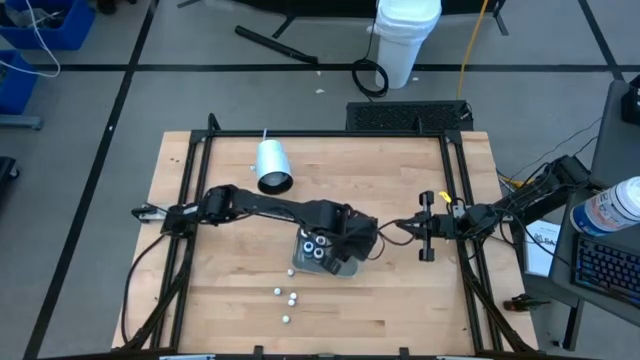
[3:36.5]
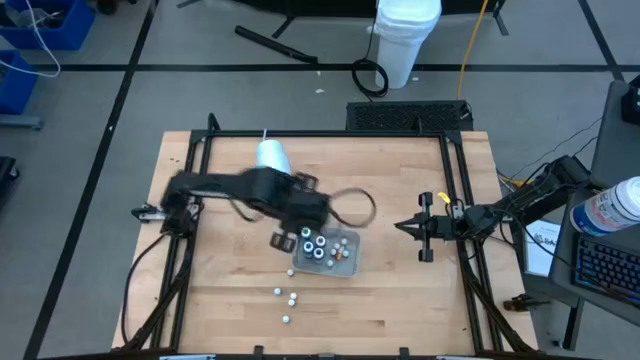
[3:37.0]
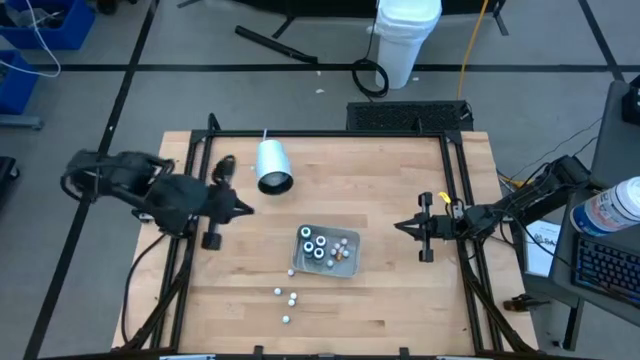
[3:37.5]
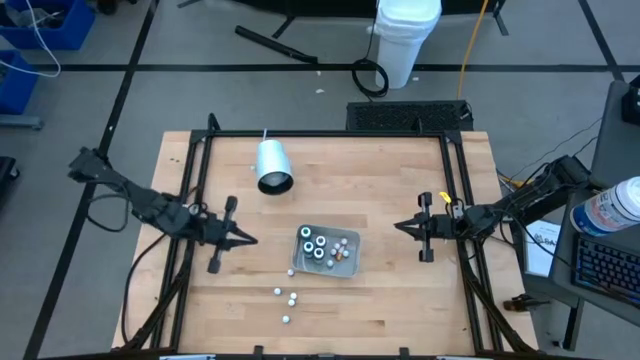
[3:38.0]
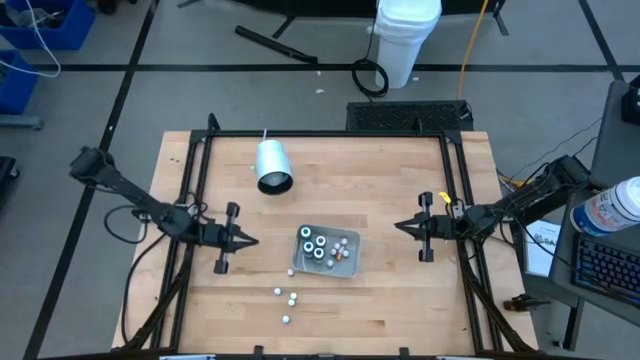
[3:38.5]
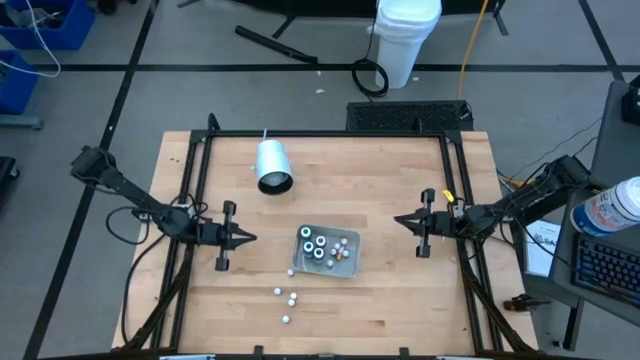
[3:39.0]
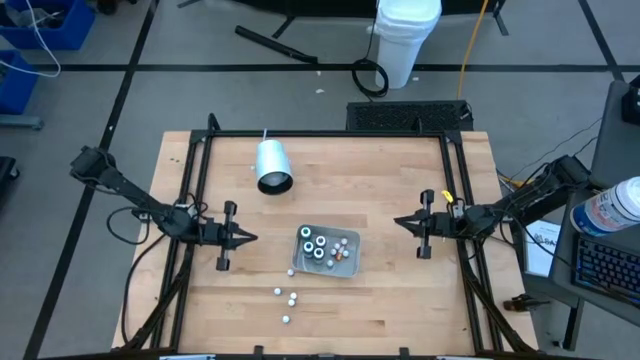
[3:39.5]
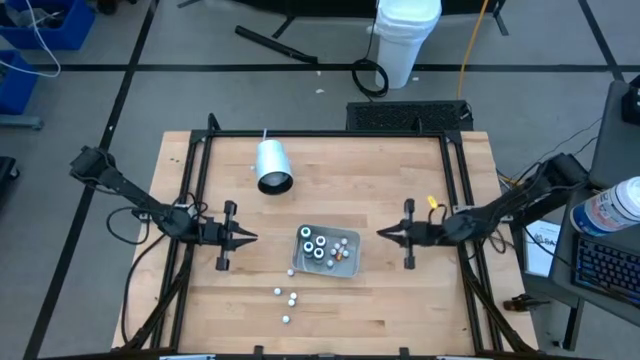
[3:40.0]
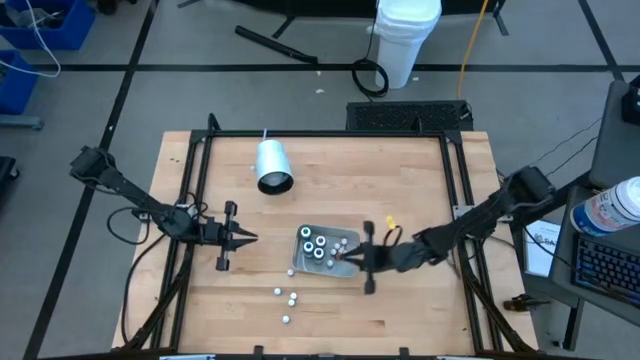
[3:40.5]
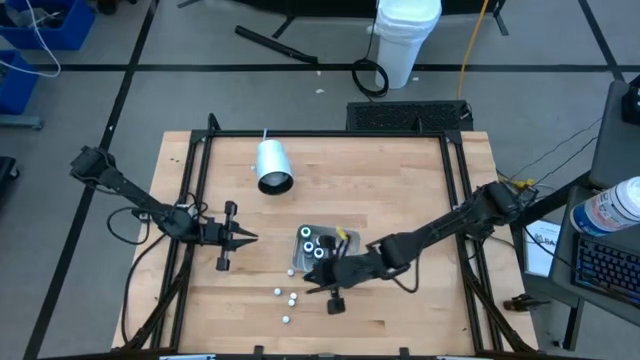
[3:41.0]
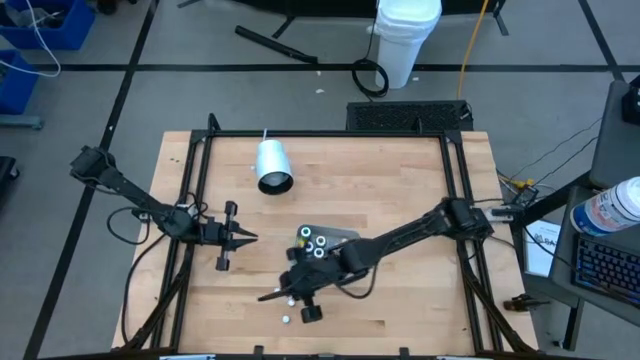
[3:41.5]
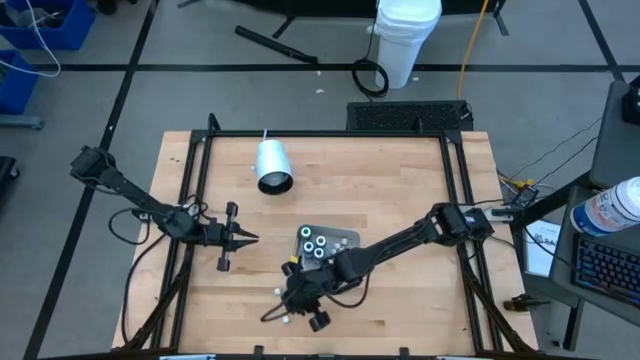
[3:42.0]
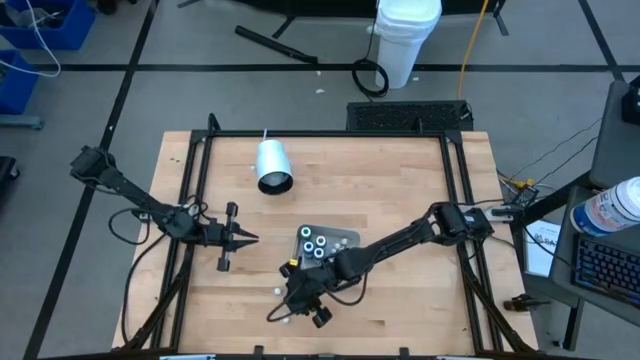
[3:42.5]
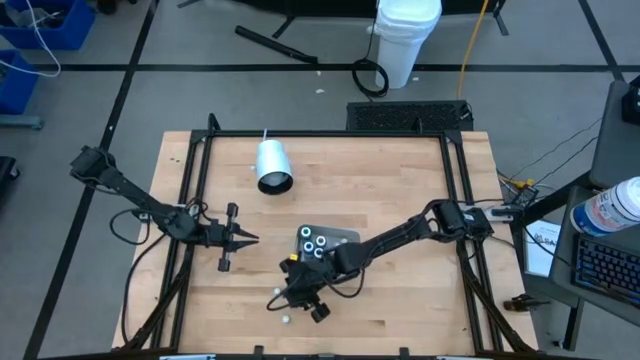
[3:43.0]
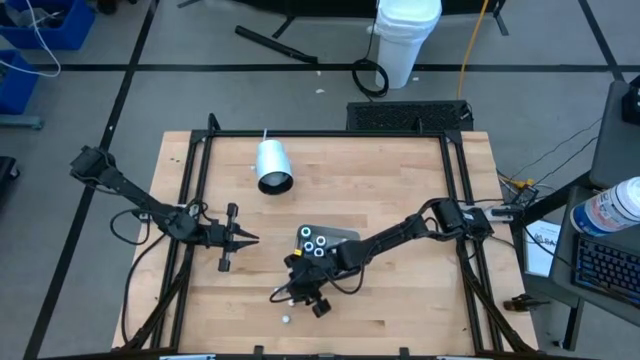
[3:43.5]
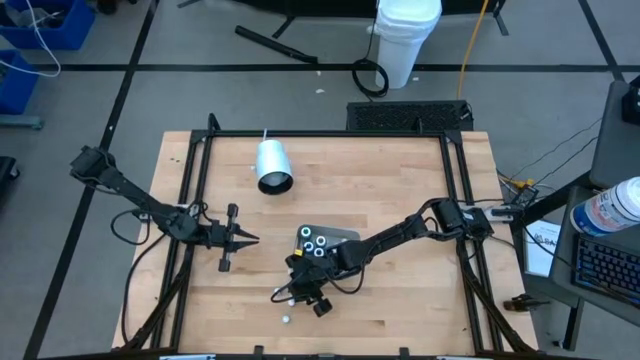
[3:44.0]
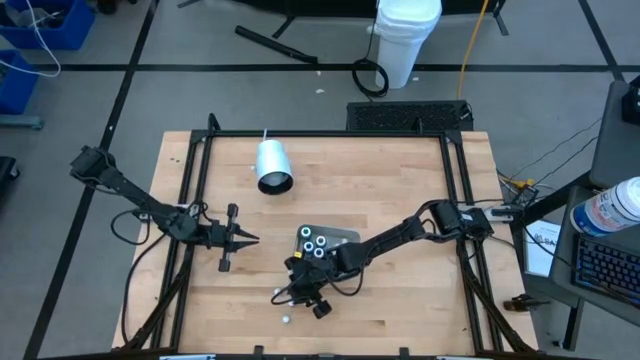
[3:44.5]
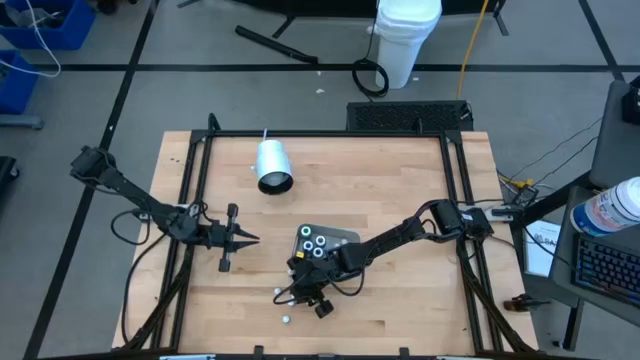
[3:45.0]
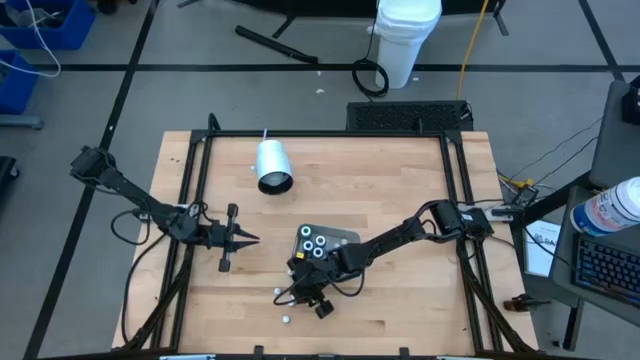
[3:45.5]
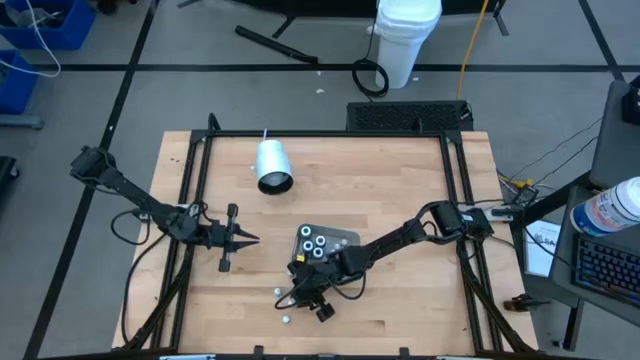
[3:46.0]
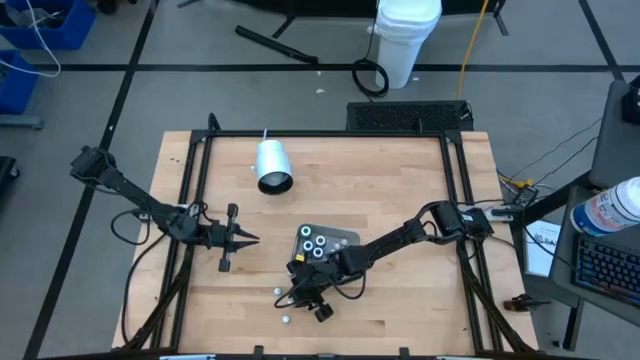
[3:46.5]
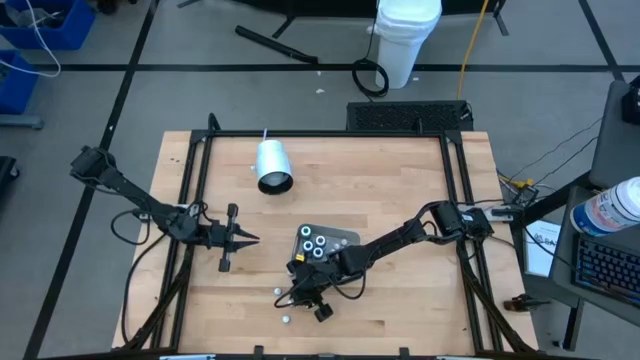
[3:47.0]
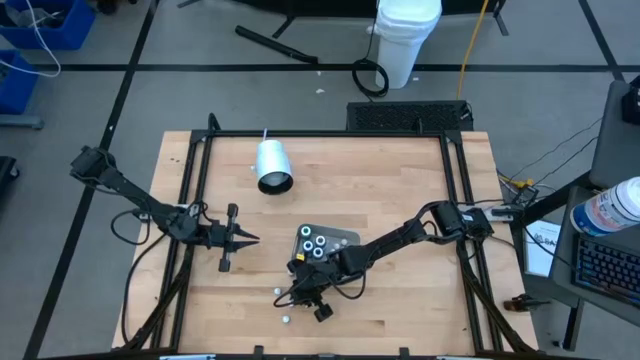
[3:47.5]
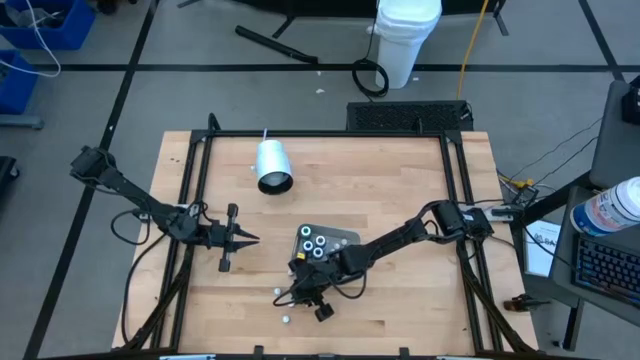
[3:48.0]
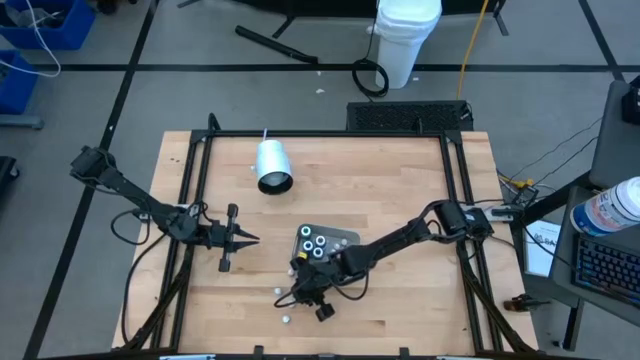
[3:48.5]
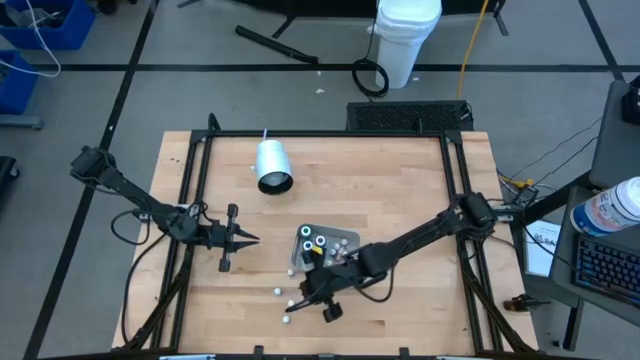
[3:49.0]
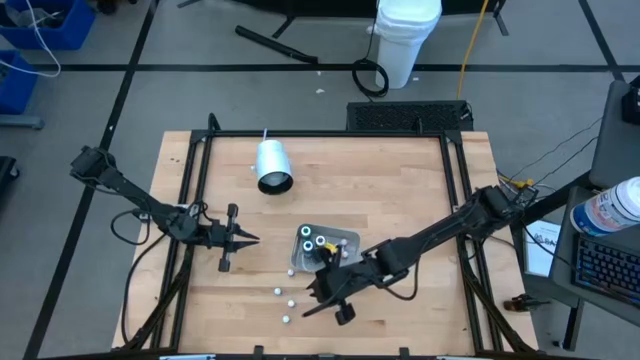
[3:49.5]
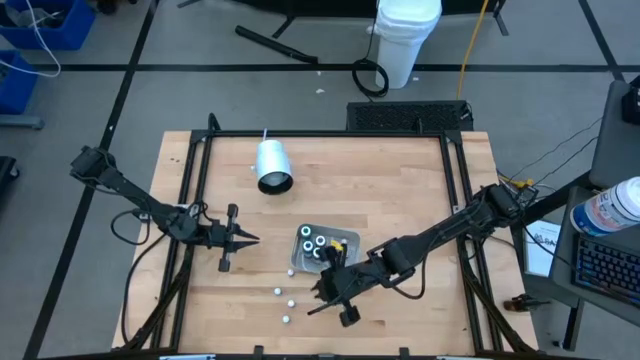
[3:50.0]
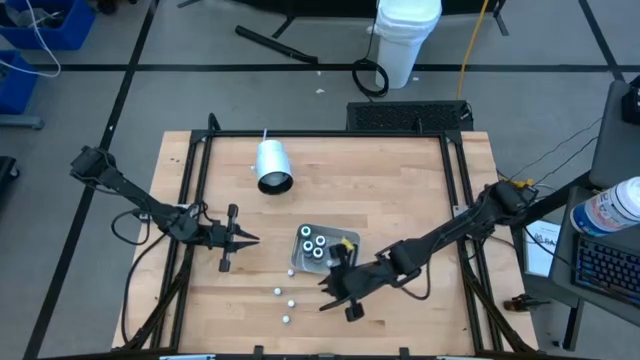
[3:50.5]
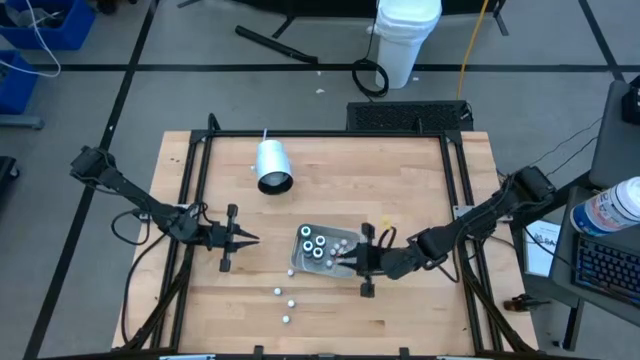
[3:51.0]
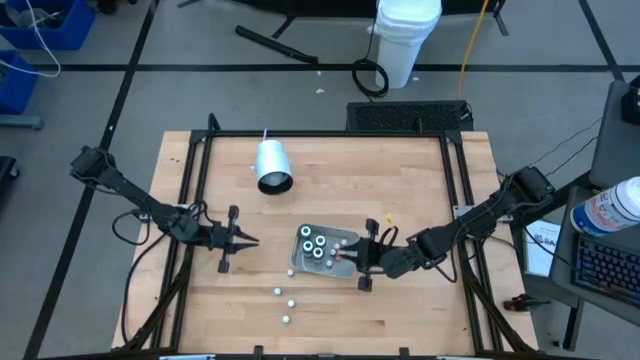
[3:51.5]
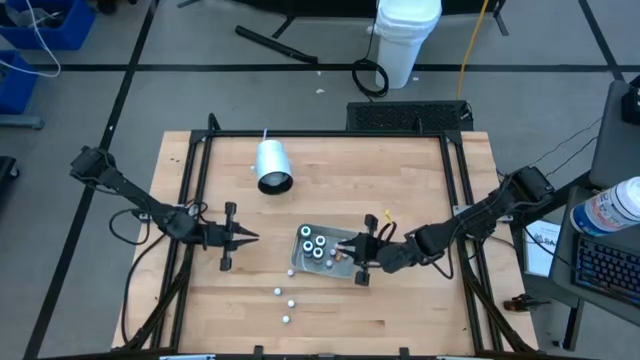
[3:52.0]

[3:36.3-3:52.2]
Task: Pick & Place food coloring
Put the black food coloring bottle into the gray bin
